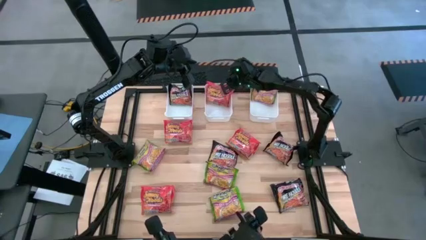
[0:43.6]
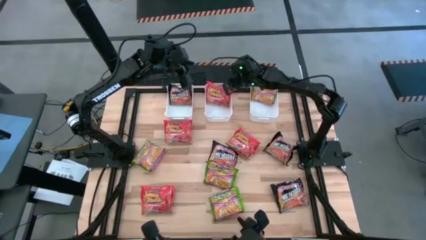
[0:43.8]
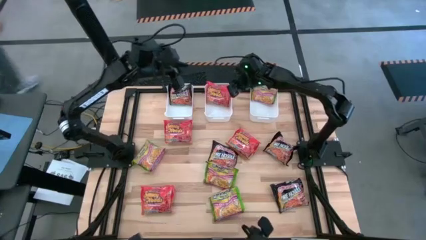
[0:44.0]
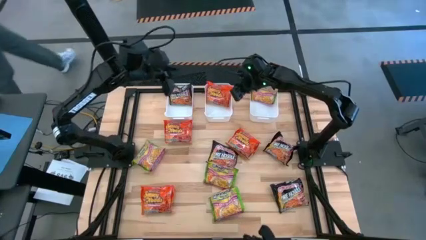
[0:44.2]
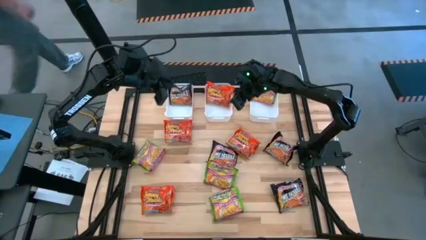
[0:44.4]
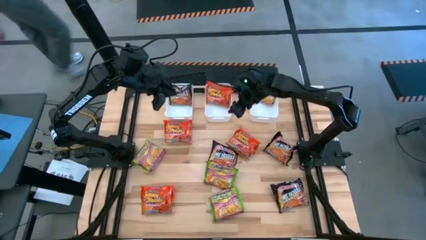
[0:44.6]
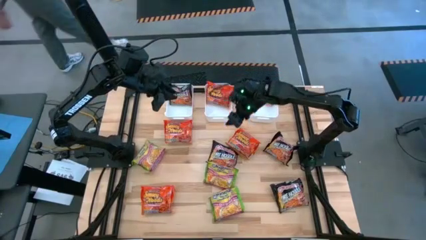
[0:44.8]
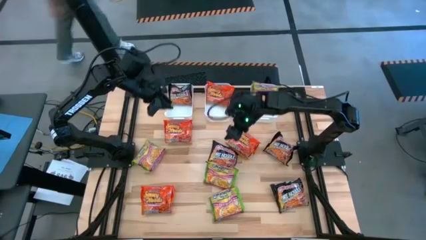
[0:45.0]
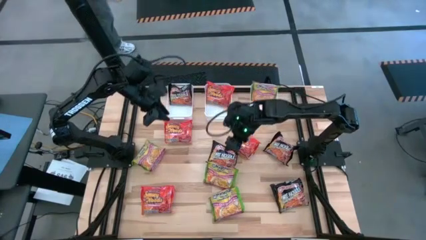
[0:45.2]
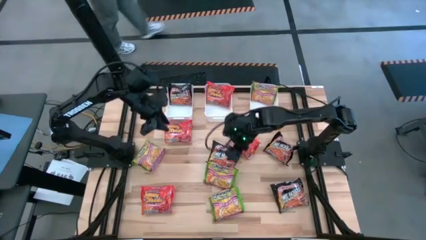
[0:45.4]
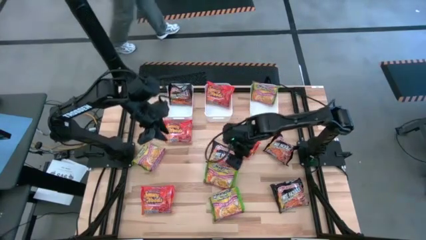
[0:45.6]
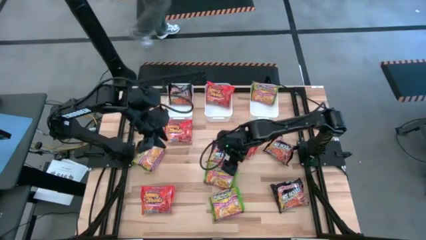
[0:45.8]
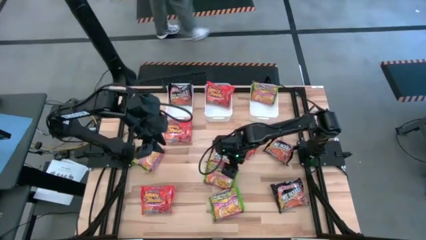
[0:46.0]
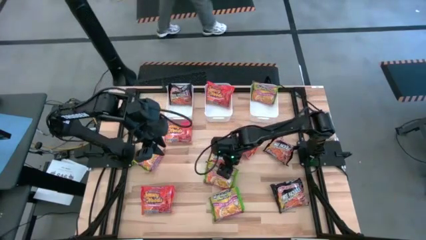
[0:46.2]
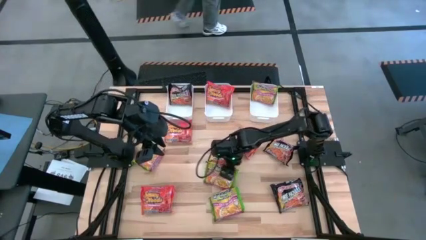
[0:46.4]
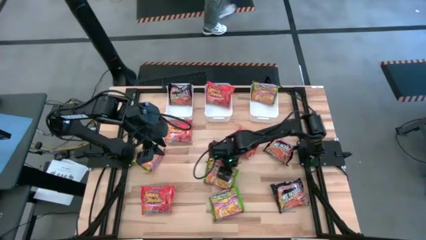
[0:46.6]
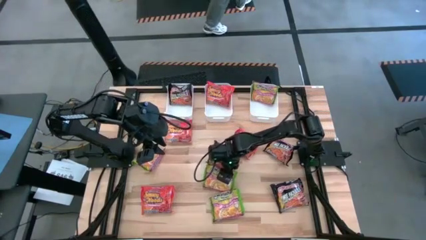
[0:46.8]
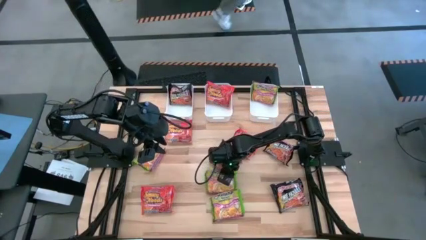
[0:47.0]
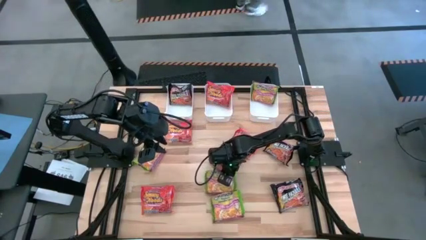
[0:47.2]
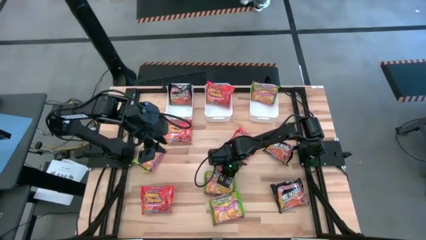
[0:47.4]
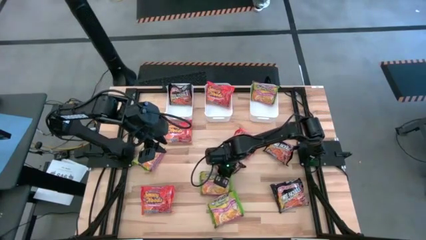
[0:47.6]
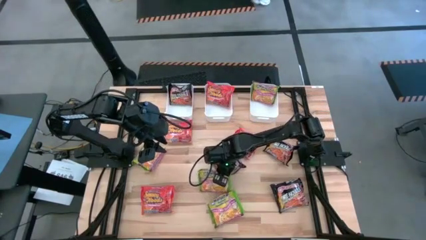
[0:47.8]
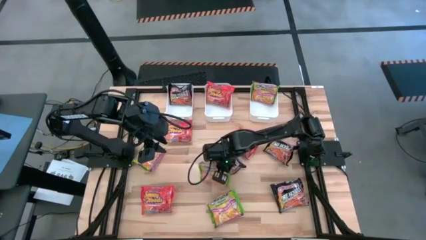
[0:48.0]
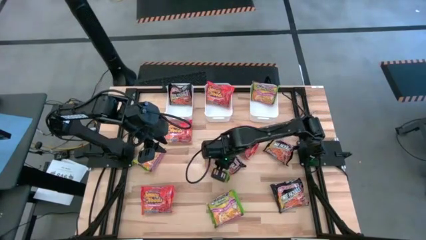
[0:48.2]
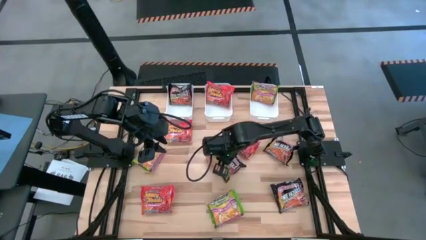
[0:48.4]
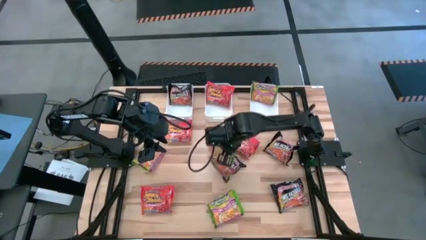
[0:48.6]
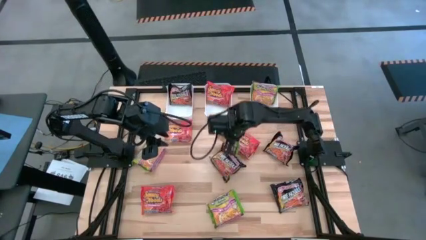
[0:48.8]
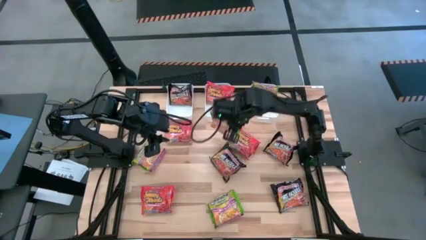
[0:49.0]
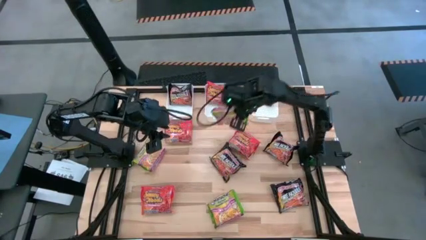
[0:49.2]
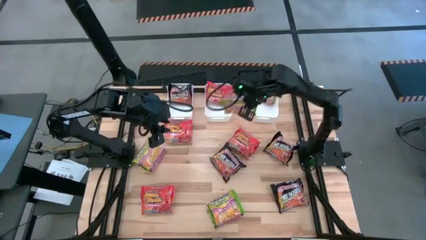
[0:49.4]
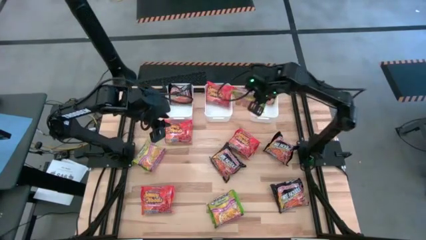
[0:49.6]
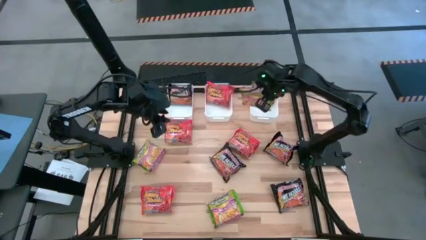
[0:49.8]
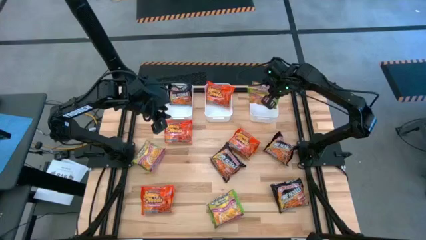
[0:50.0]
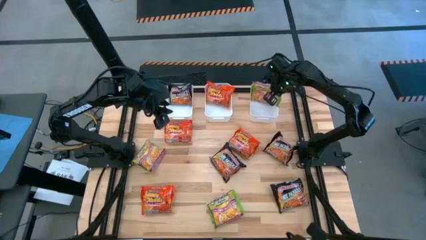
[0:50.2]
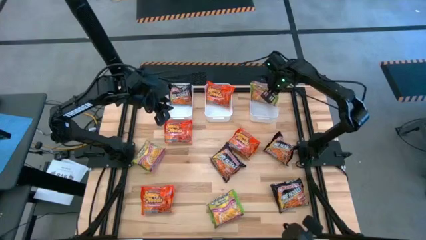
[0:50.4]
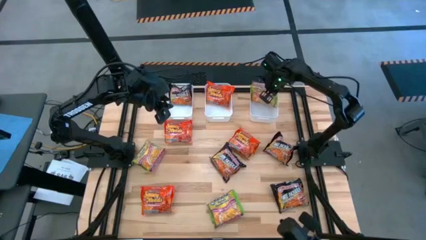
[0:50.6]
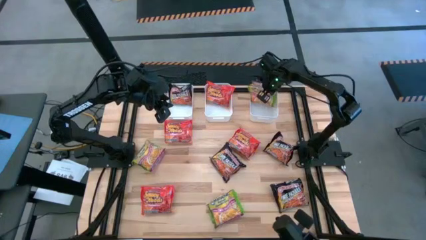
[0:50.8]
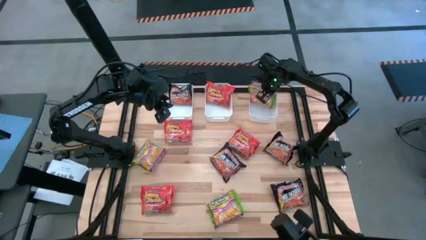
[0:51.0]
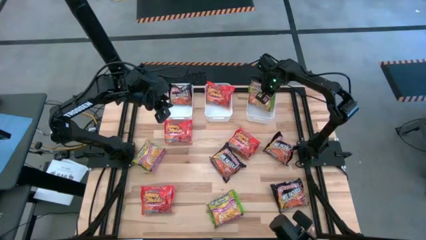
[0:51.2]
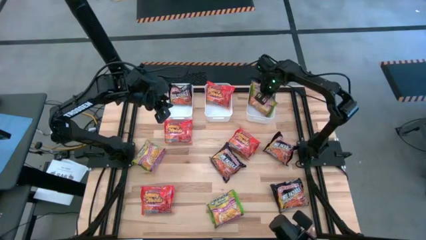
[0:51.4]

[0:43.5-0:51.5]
Task: Sort Maruchan noodles
Put the green noodle pack into the right white bin
